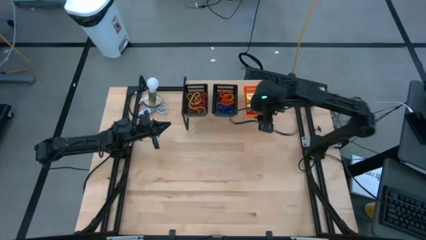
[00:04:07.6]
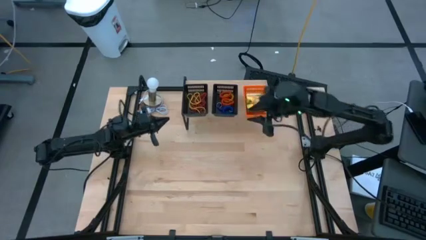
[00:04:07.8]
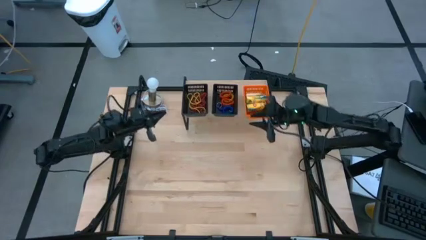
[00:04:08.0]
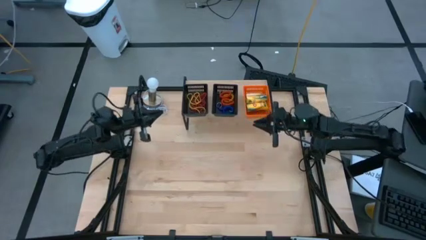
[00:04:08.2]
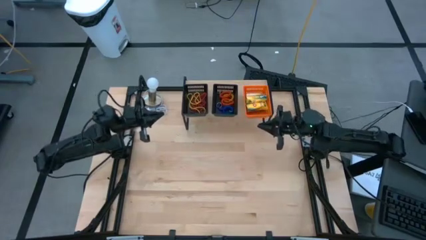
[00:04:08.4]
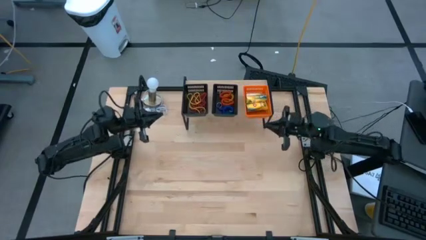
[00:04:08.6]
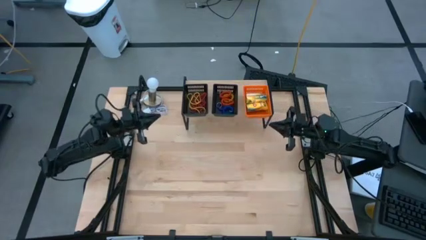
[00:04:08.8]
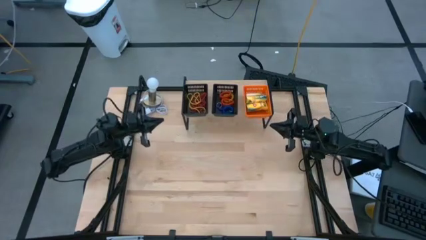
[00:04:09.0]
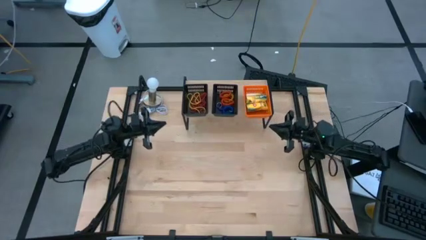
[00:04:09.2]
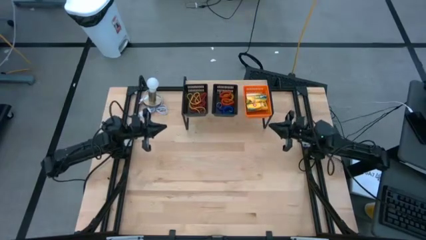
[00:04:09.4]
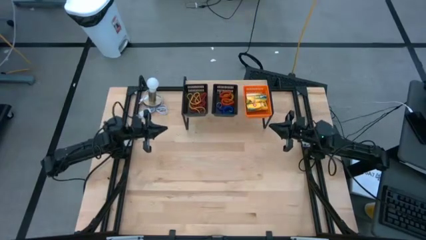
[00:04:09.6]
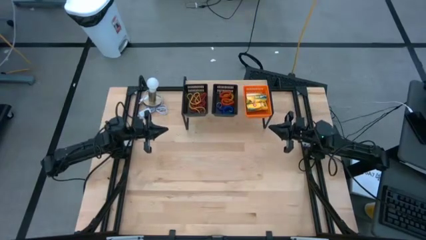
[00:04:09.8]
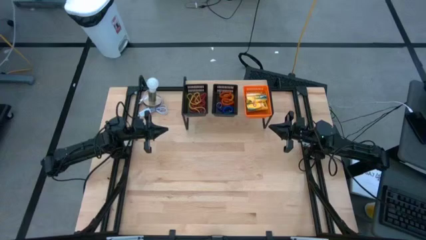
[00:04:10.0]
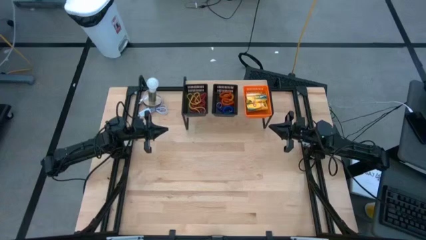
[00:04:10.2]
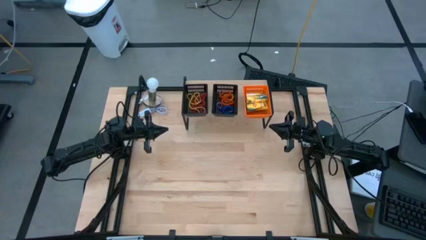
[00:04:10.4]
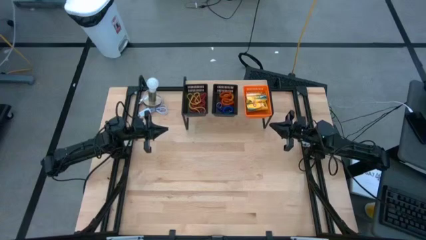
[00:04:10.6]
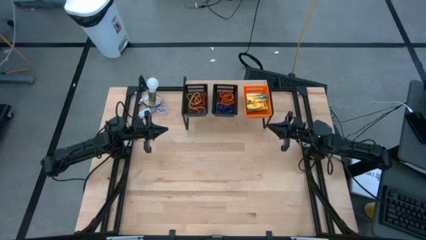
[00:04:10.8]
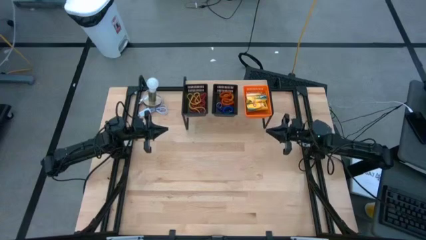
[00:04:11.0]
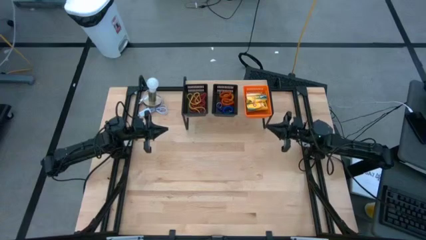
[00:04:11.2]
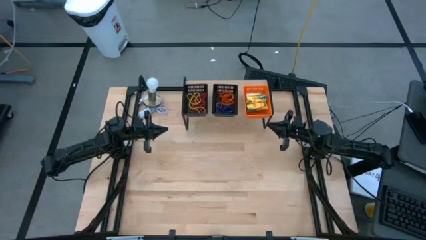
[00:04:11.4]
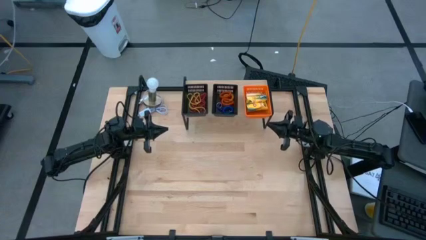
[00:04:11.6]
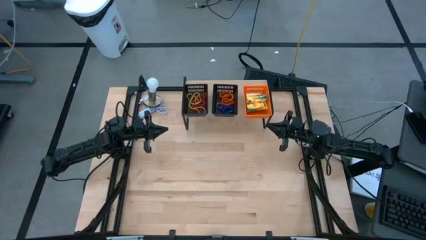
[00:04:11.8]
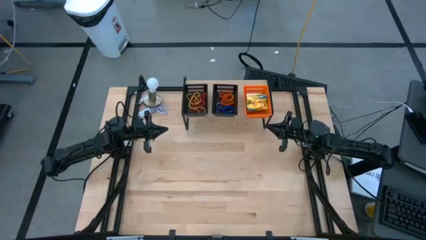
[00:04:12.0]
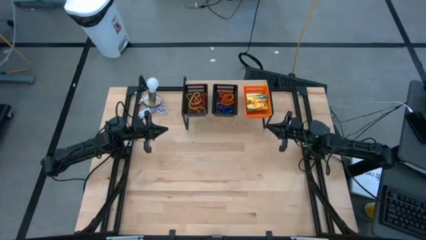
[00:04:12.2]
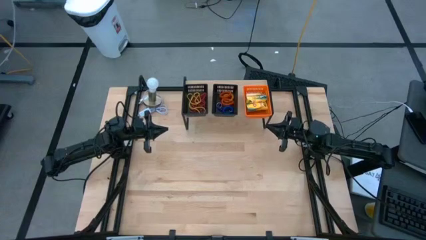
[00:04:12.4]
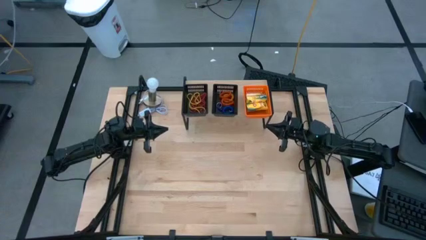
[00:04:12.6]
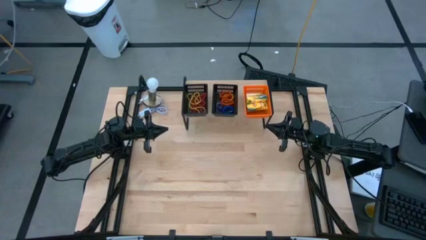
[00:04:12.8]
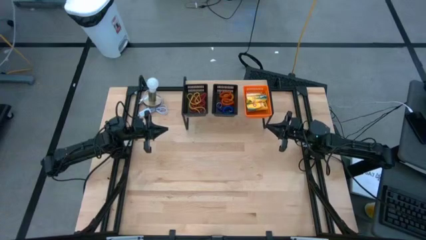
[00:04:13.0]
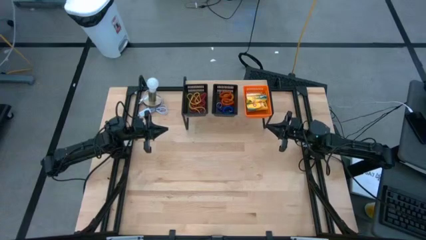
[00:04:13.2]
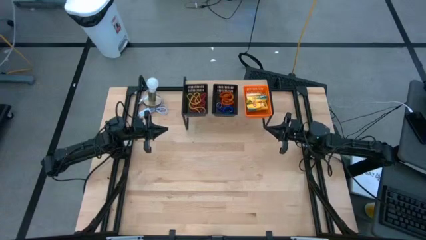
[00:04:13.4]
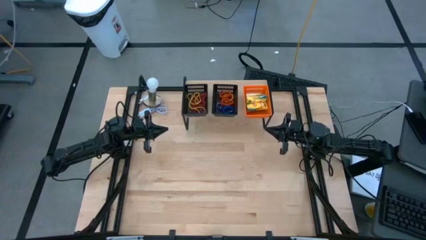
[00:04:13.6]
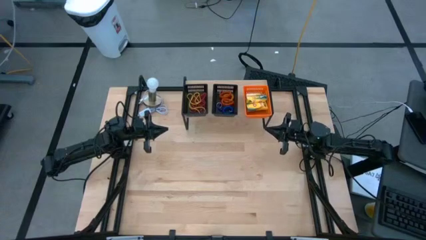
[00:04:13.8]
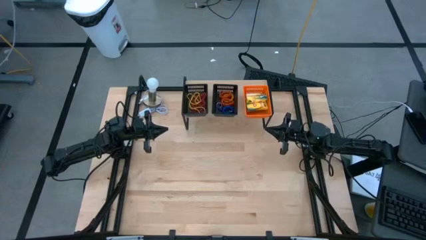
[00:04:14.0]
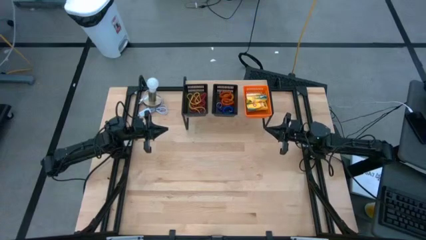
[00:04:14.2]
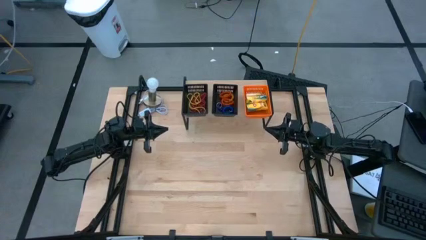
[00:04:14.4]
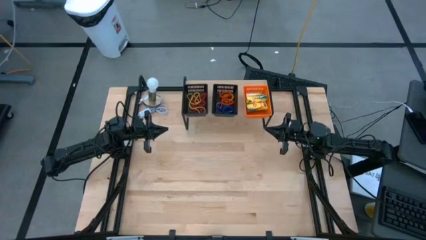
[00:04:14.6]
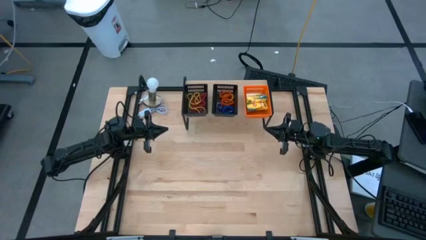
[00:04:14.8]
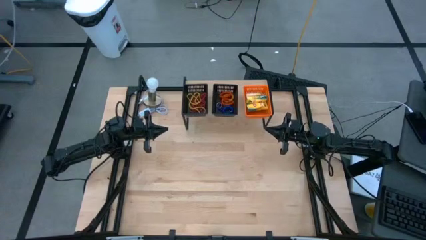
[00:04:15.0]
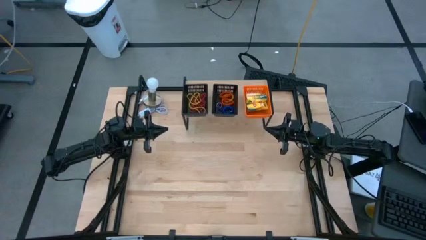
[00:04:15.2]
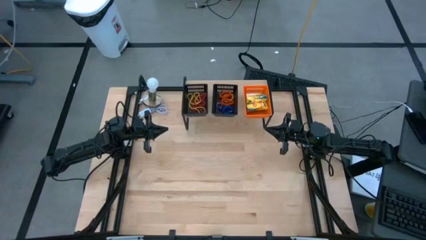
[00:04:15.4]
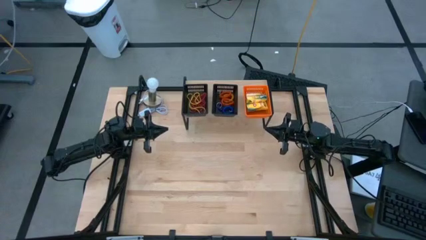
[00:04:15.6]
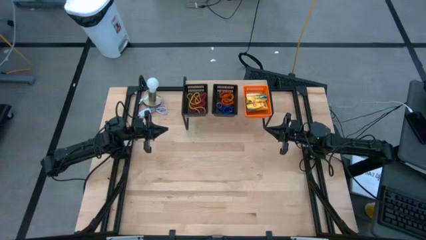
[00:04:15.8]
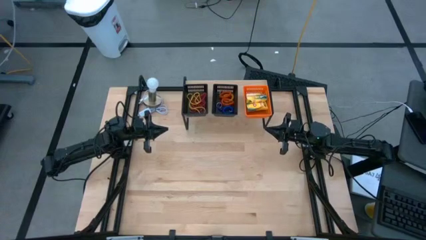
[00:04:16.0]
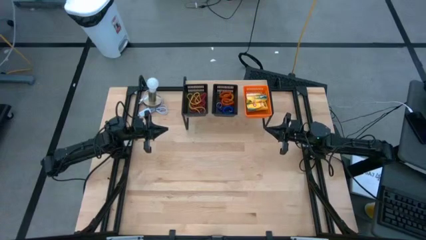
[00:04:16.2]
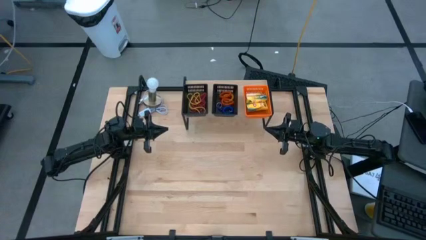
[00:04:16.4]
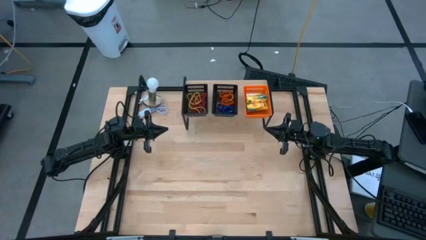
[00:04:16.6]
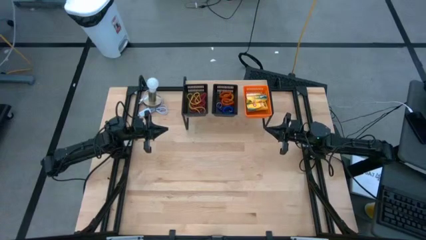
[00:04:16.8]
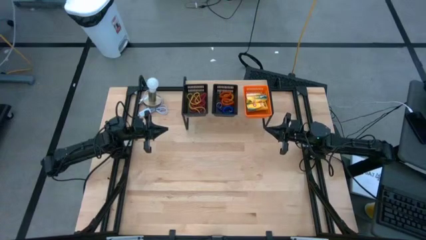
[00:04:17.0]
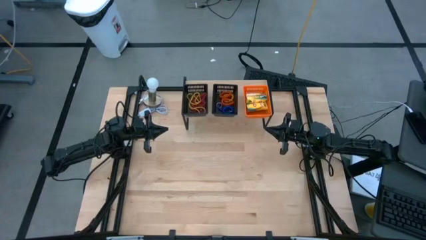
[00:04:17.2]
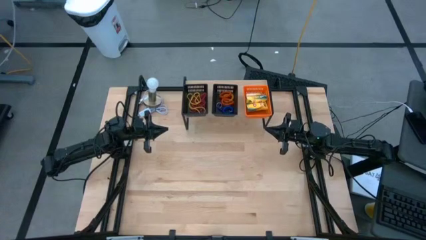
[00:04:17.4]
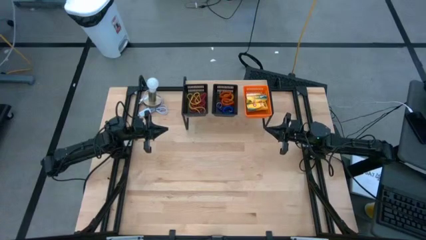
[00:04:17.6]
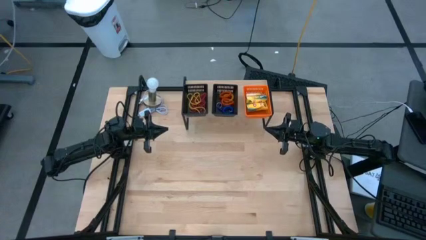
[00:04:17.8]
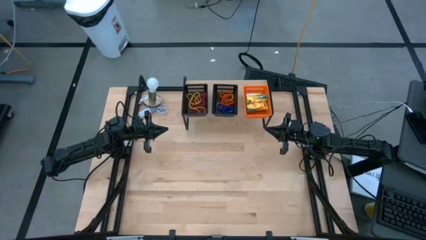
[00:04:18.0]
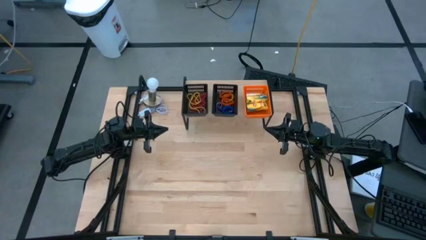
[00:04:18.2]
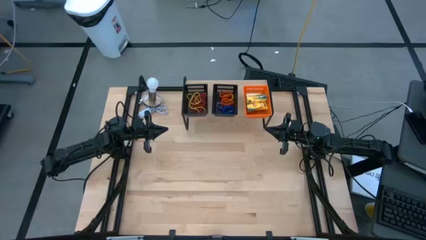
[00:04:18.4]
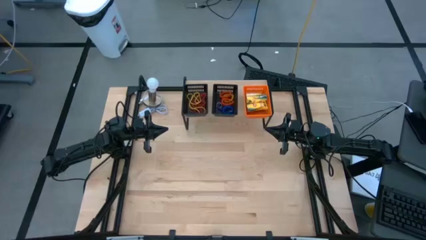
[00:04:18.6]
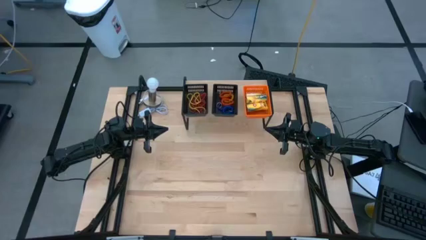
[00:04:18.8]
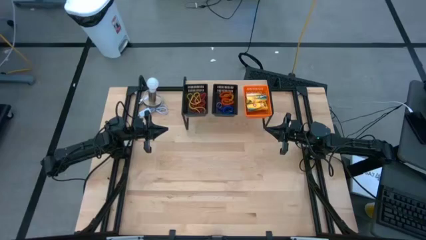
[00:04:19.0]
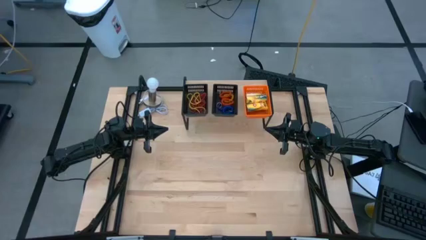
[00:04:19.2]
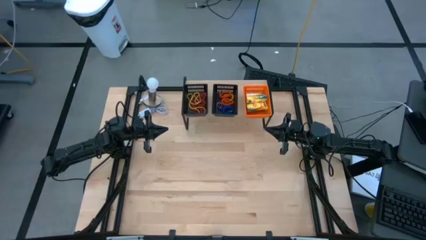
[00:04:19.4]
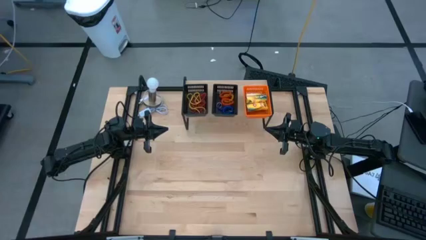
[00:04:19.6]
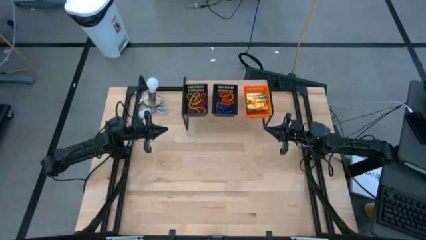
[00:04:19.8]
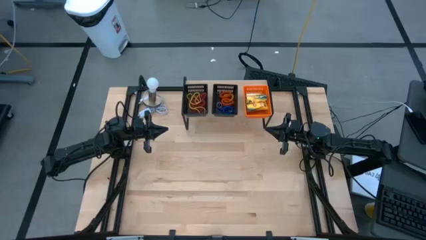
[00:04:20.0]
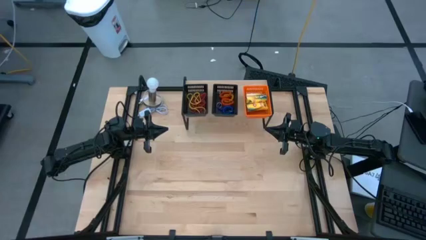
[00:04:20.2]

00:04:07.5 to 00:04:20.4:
Task: Pick & Place Office Desk Supplies
Return to Home Position
